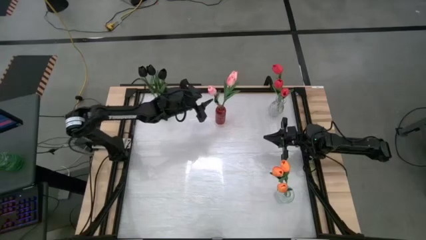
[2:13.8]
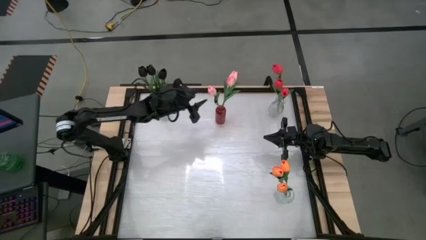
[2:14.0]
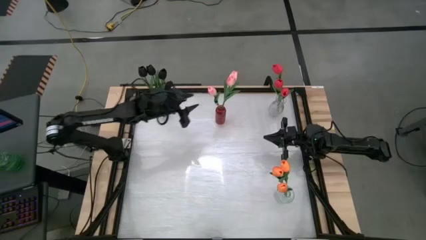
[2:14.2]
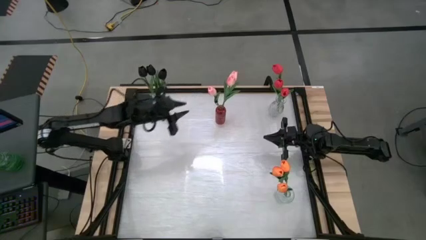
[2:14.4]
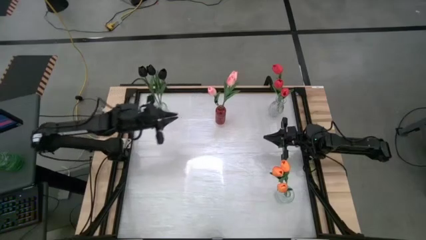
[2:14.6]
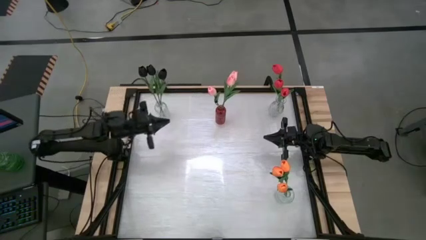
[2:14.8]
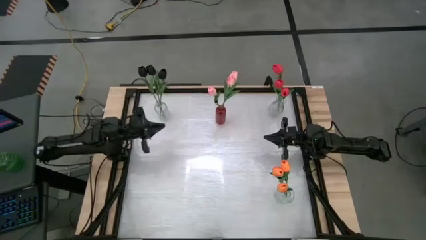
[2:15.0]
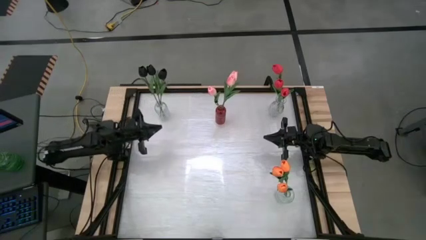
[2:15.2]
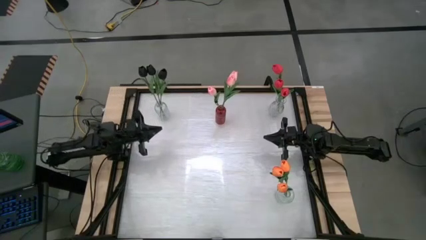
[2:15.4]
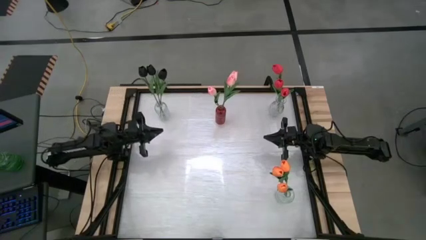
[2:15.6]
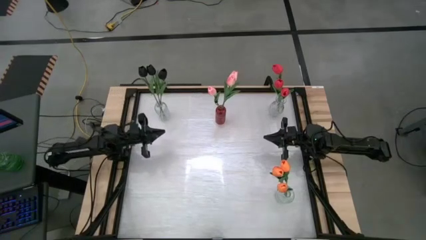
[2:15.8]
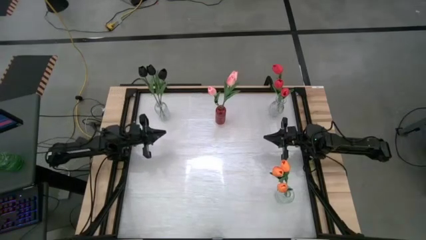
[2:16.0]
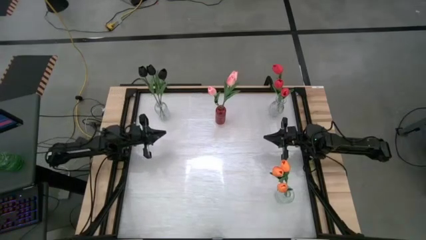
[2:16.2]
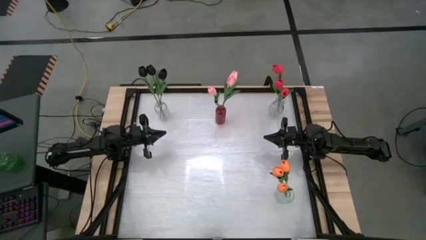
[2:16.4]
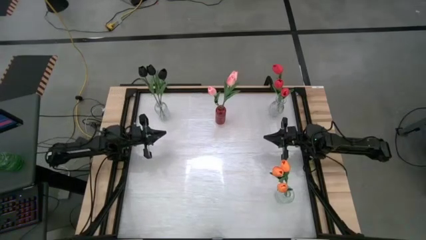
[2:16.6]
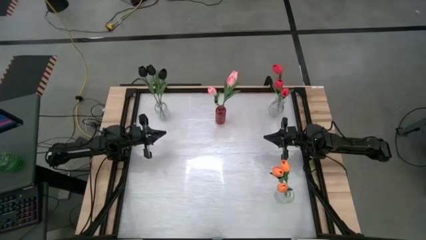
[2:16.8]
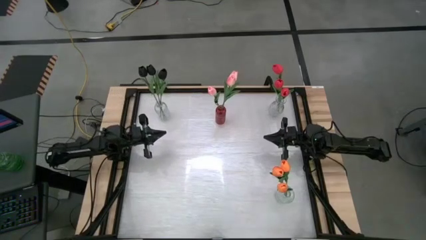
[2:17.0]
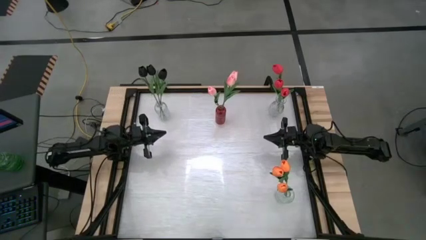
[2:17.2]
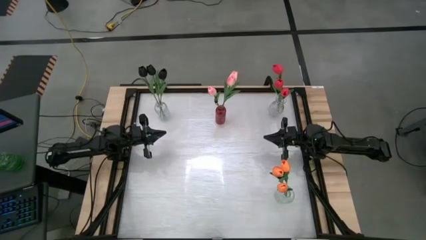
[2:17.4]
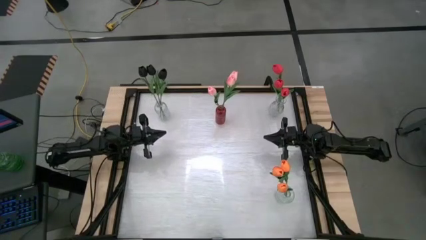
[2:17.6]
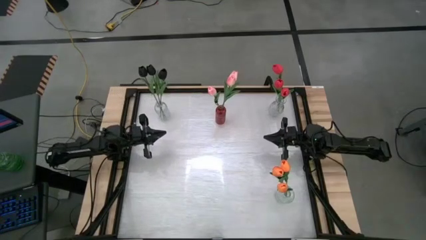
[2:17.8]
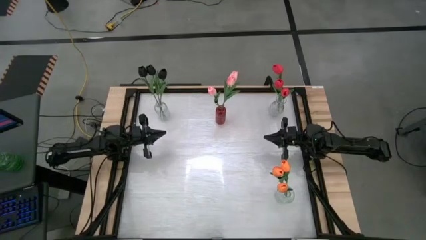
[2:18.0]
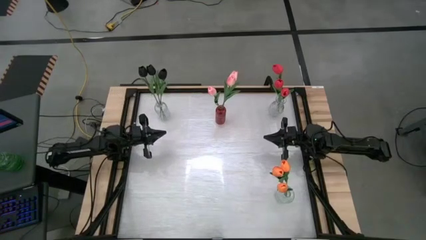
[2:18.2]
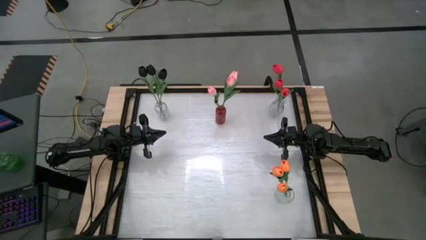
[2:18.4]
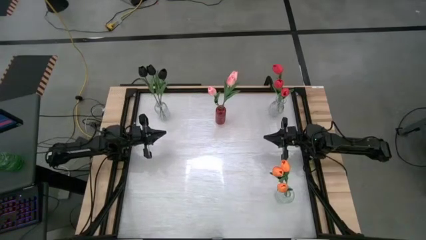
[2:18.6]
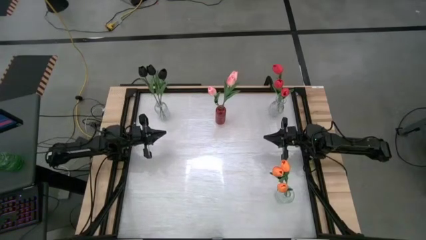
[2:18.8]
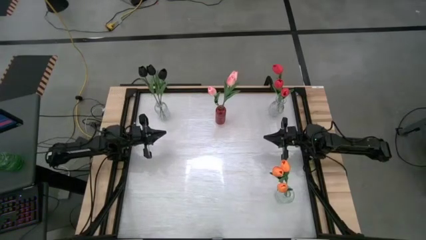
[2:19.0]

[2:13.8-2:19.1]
Task: Sort flowers into vase by color
Return to Home Position

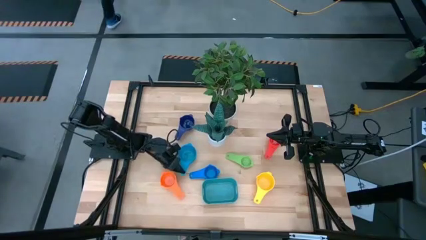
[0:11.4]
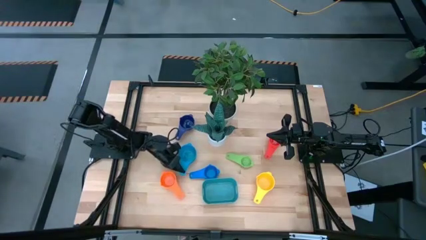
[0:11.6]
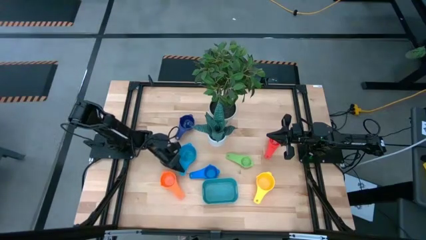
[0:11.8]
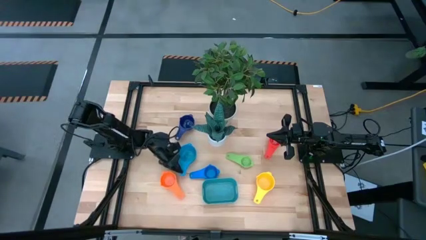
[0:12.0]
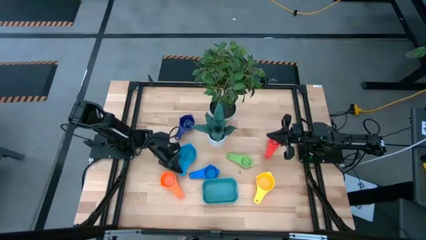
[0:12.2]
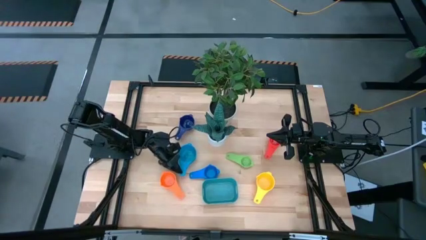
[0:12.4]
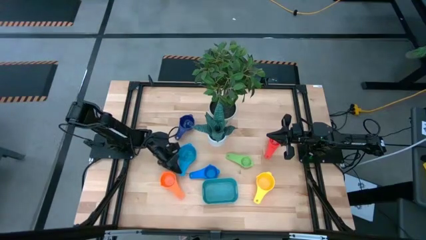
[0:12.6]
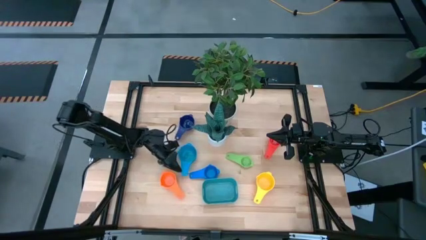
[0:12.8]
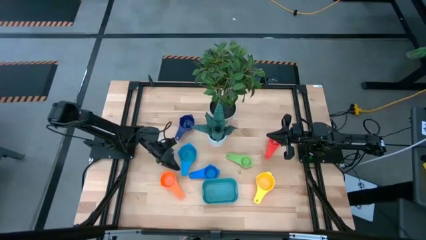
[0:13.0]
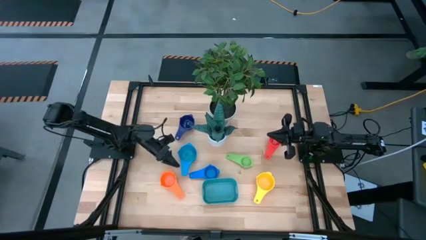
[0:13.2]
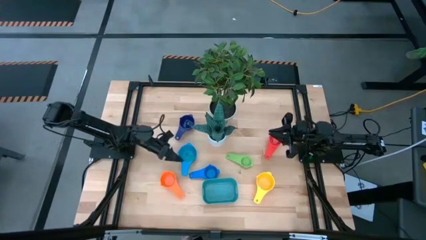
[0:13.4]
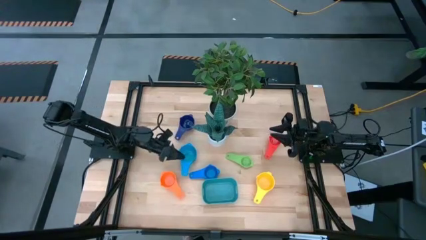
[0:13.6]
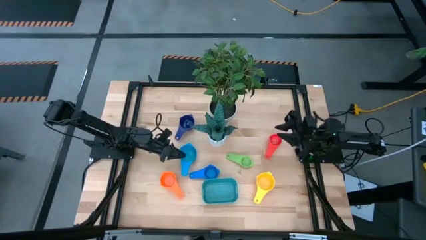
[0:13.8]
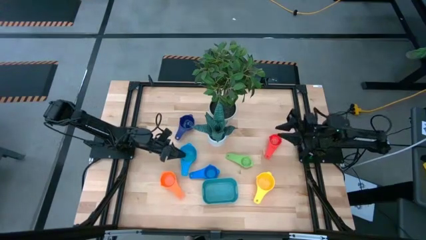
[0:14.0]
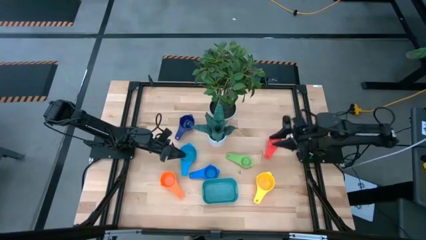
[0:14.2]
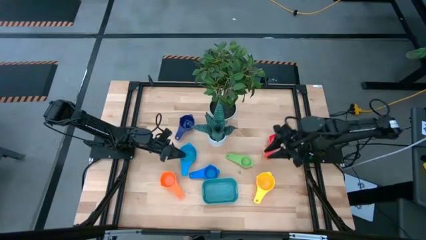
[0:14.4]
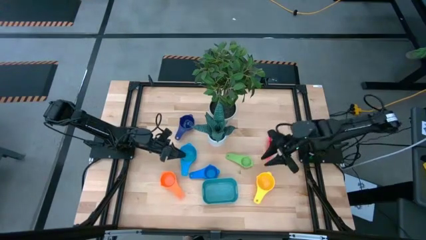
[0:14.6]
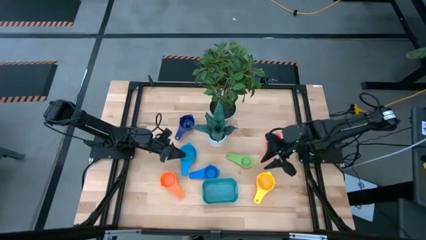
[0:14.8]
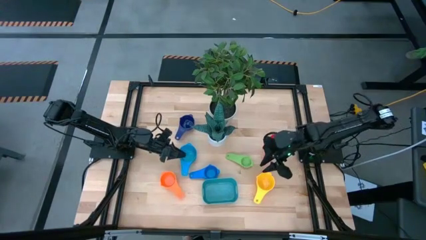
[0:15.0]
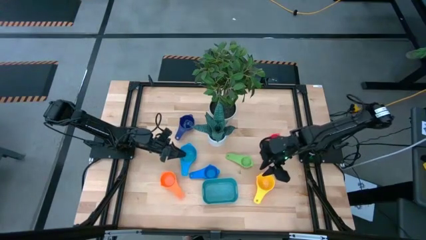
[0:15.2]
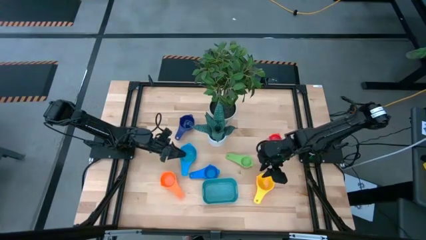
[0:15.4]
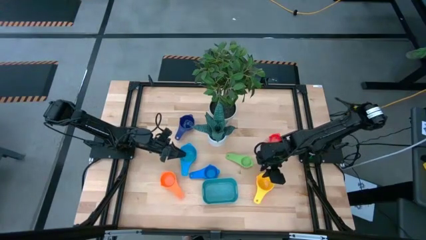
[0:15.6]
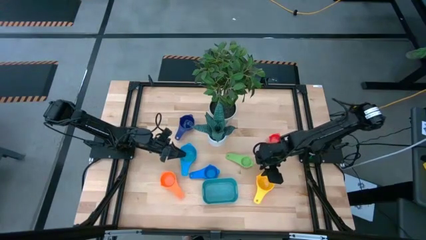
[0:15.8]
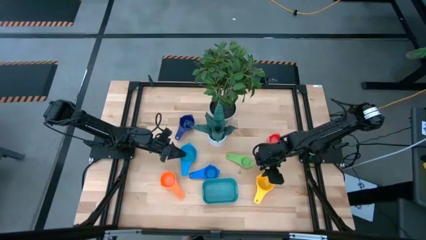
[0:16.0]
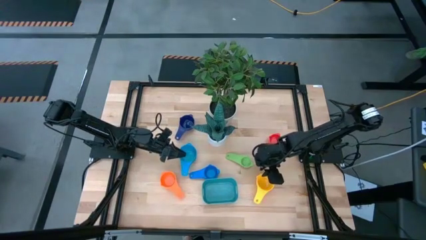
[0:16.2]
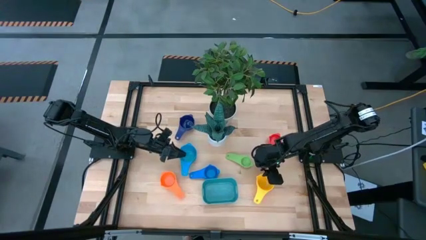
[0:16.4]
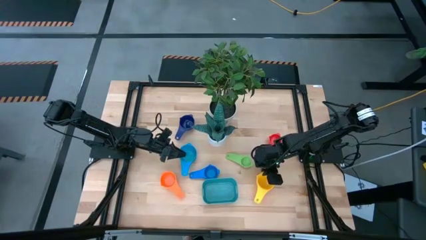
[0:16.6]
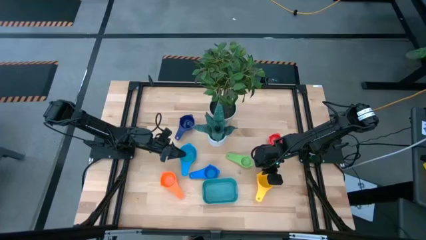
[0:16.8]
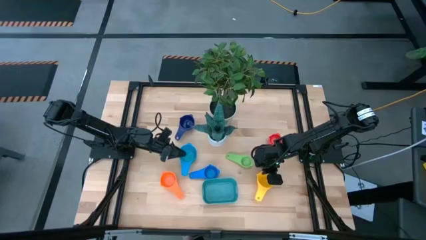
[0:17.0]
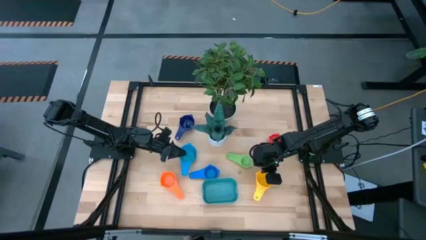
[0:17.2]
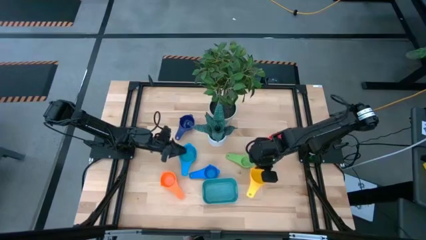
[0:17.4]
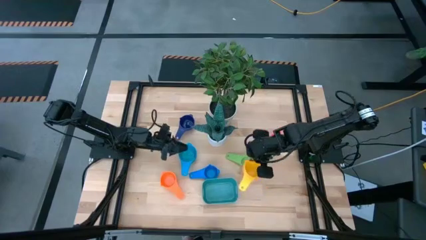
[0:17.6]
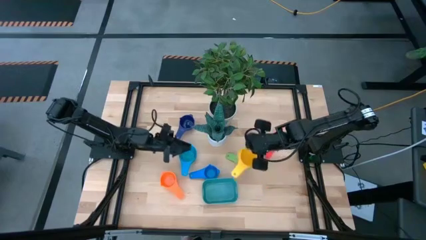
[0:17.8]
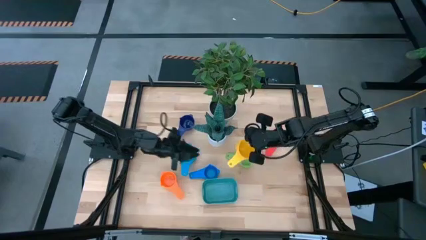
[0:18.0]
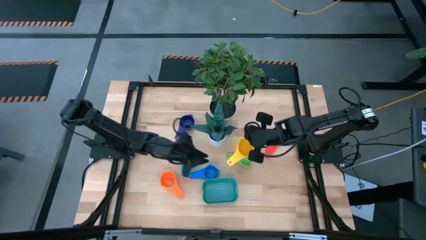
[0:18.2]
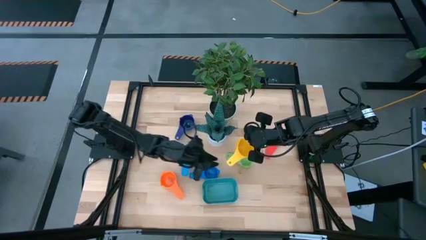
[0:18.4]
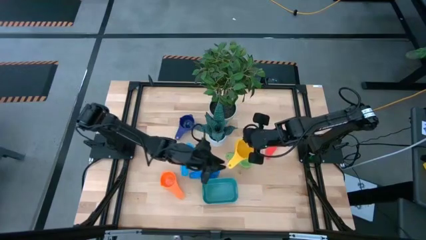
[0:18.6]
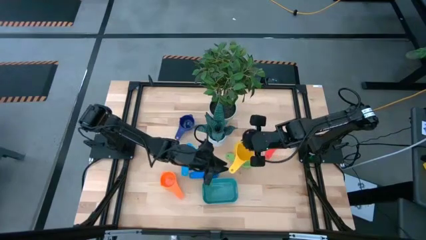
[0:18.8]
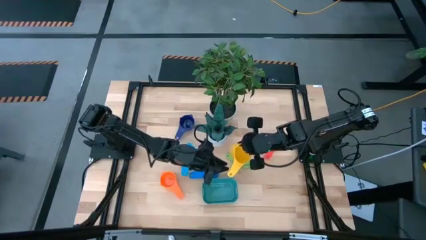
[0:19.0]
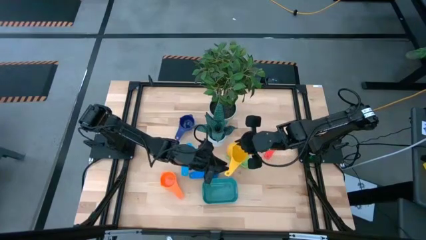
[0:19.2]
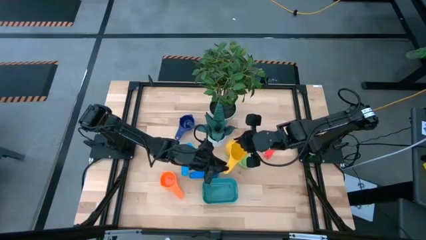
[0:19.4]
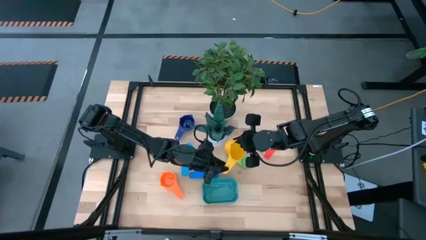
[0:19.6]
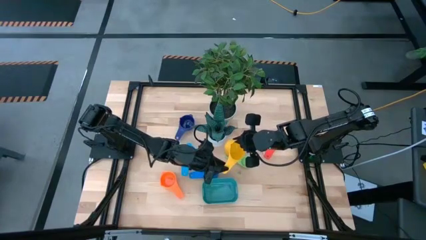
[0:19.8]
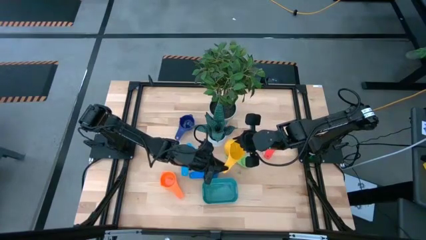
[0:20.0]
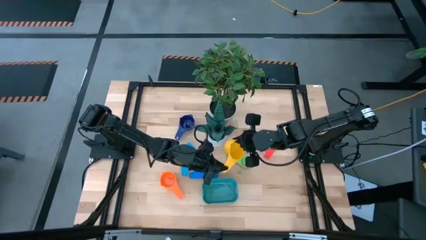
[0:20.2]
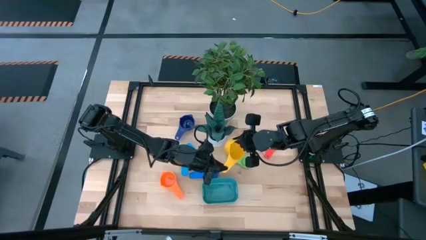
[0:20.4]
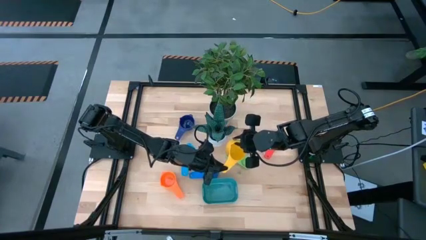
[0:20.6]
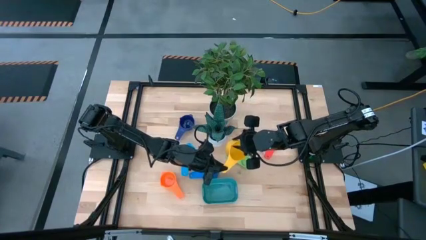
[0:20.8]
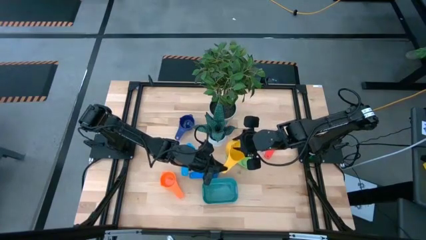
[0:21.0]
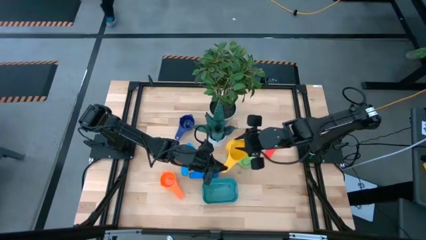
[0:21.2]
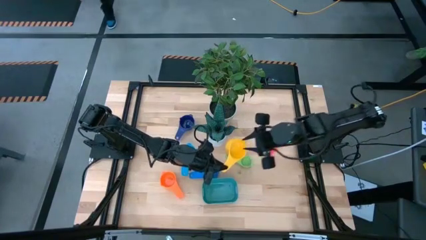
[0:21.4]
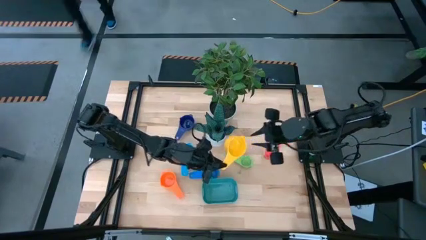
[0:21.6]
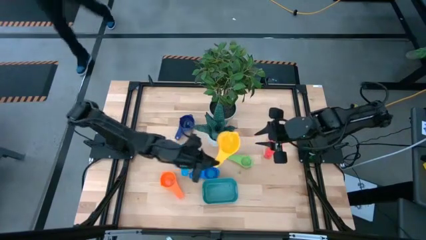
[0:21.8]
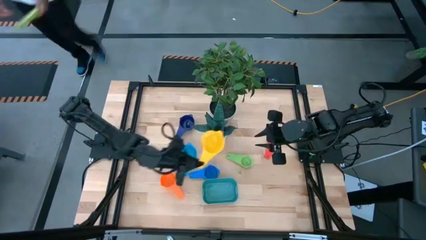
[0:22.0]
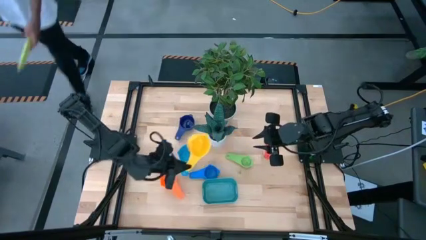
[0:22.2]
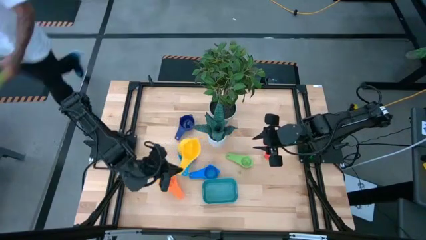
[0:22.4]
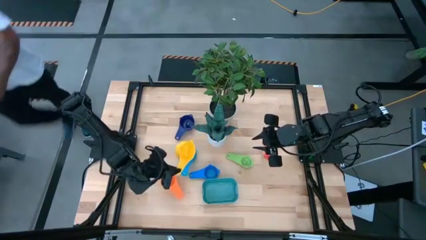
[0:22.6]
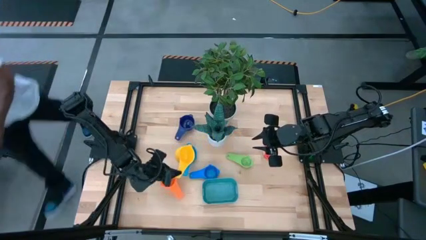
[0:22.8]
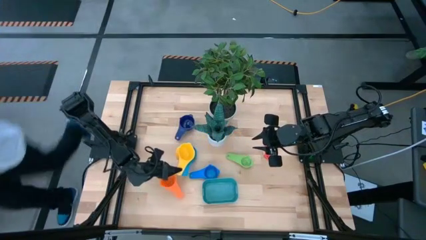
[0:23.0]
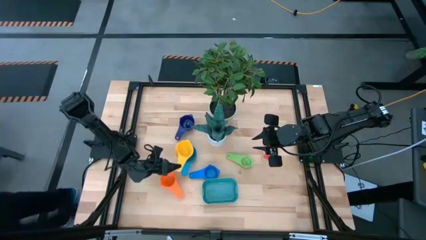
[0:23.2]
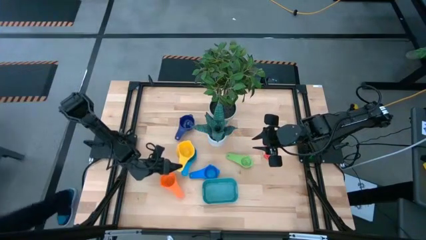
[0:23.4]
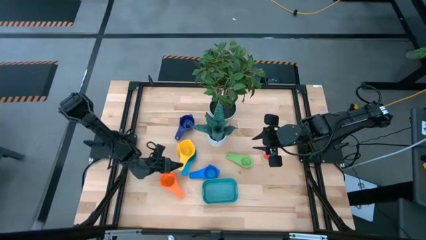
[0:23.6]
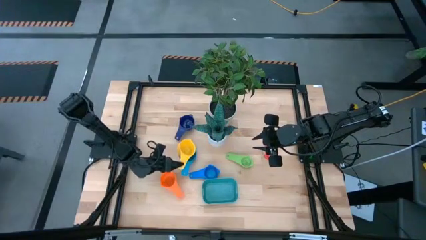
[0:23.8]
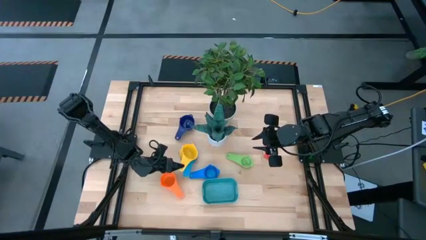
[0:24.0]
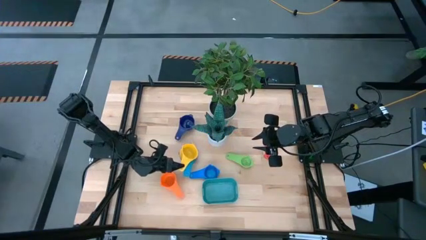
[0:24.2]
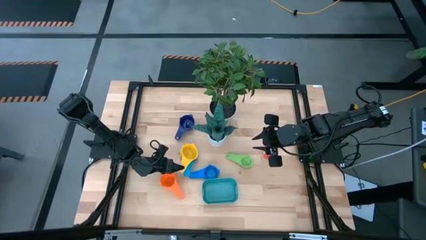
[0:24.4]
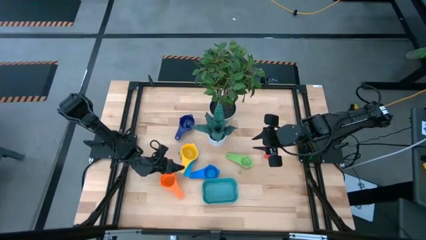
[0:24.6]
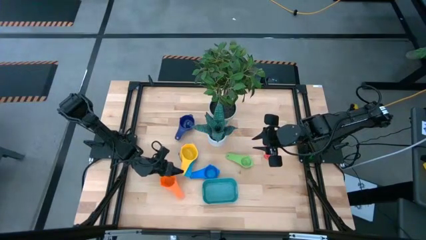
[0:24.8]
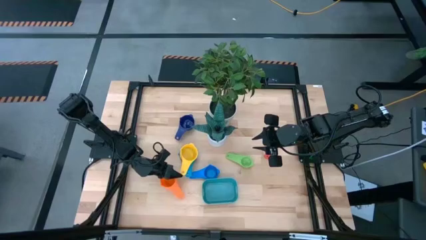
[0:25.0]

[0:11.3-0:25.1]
Task: Nest measuring cups in basket
Stack the yellow measuring cup on top of the light blue measuring cup
